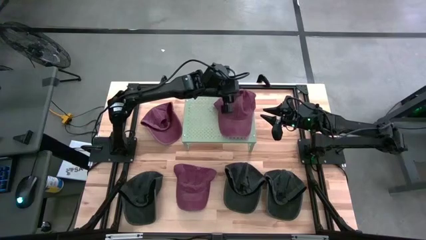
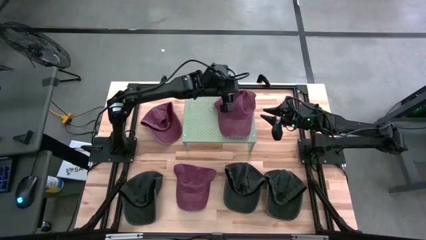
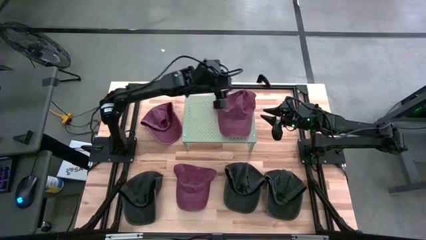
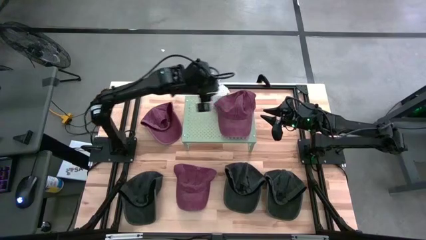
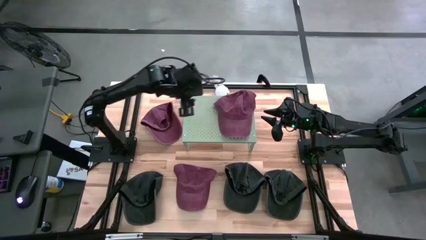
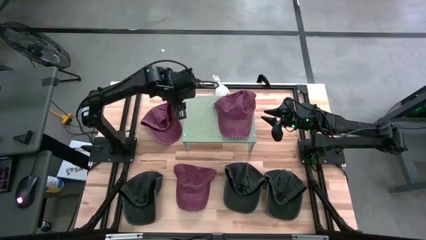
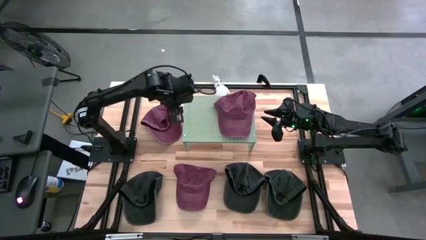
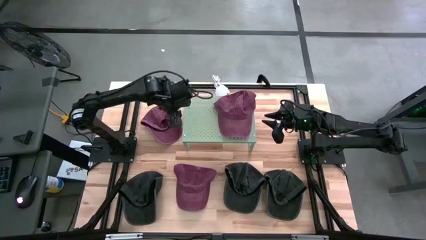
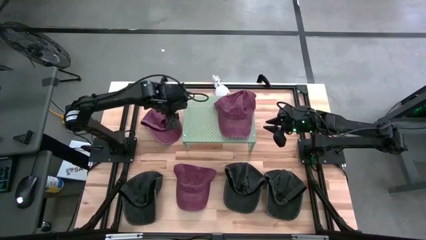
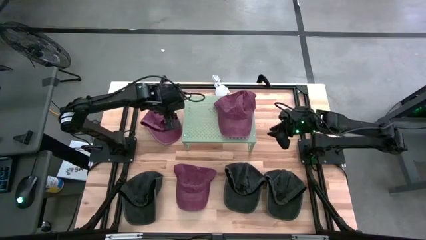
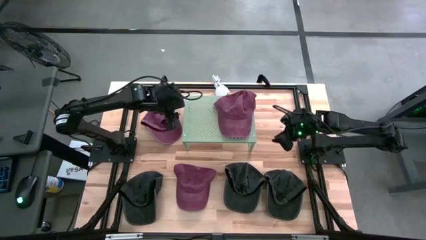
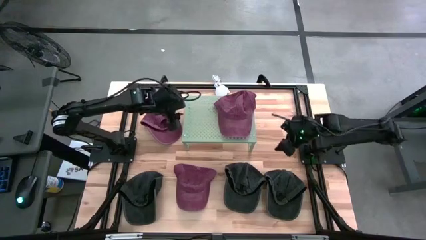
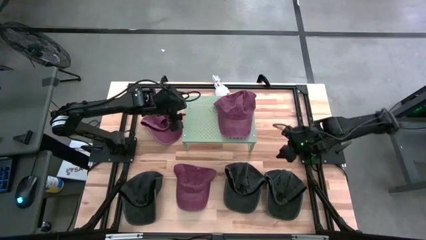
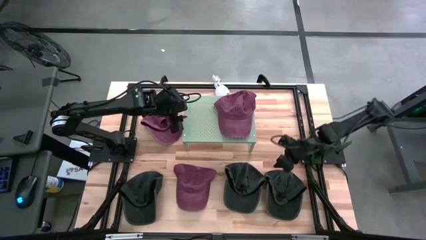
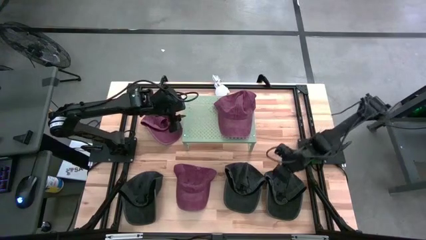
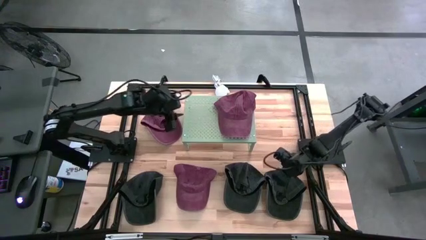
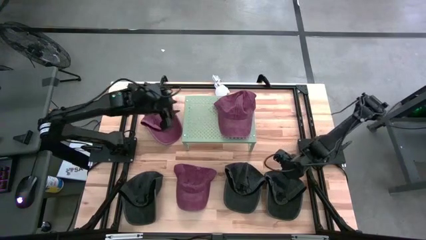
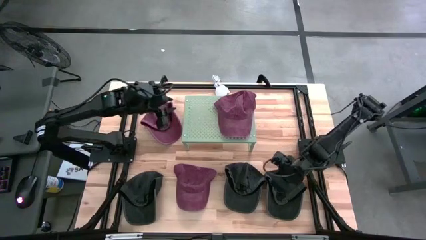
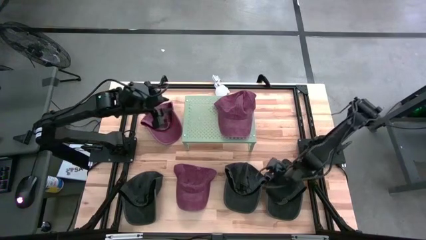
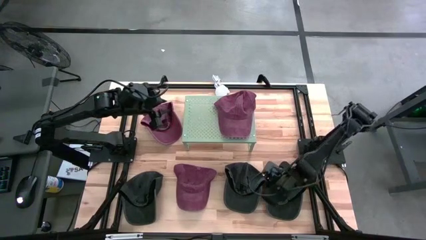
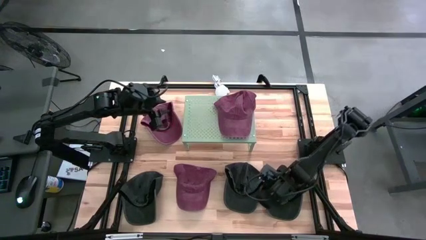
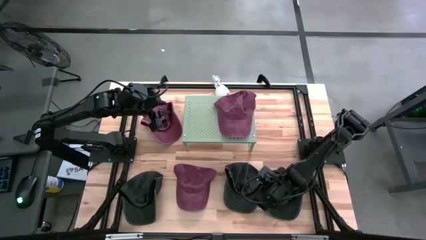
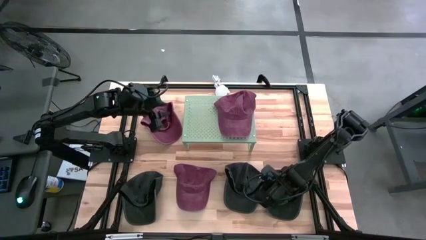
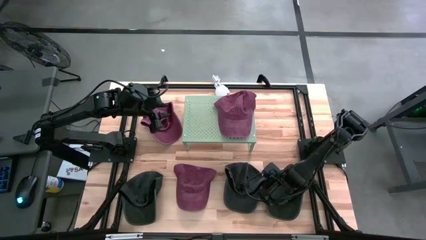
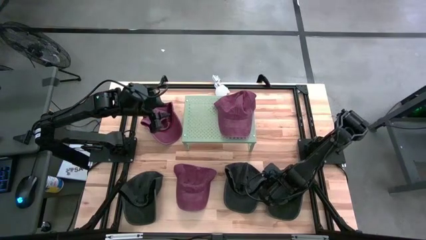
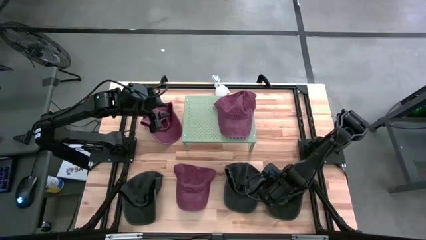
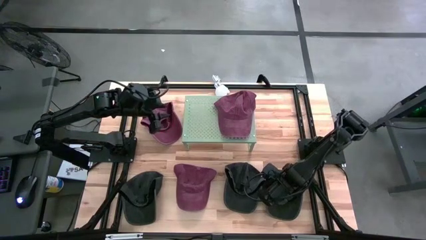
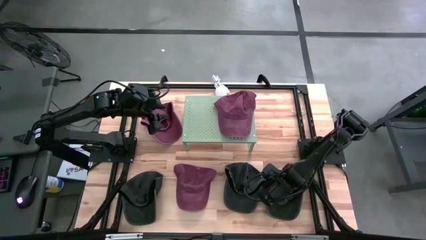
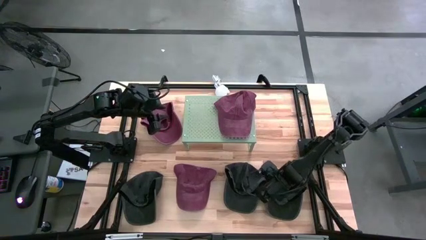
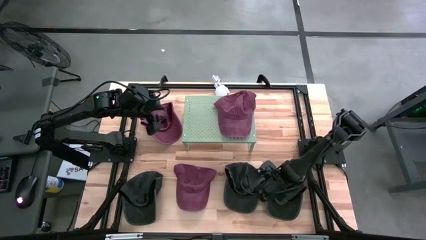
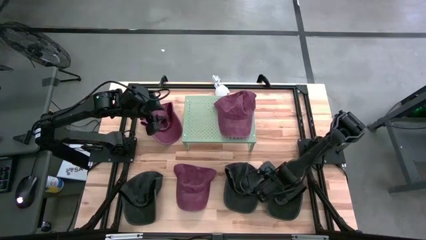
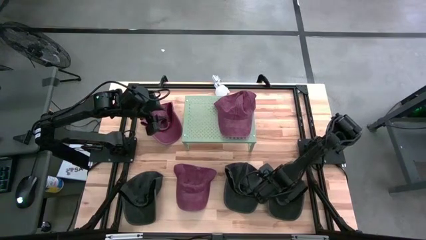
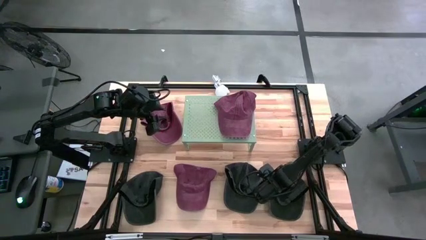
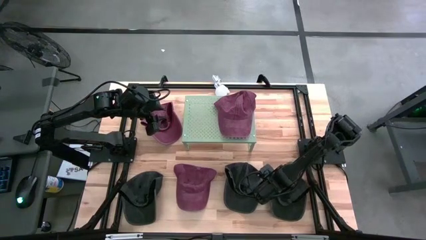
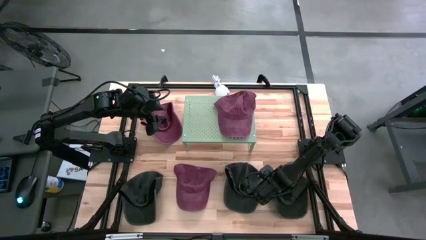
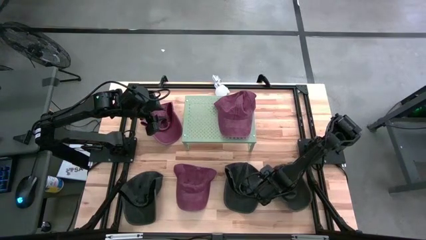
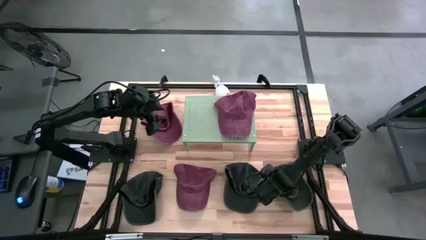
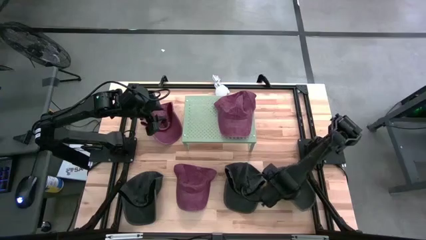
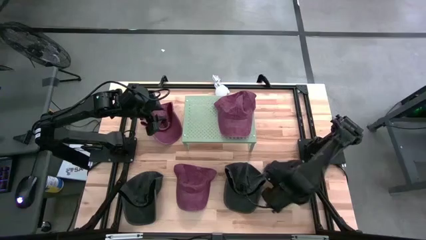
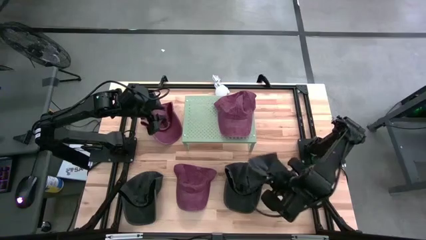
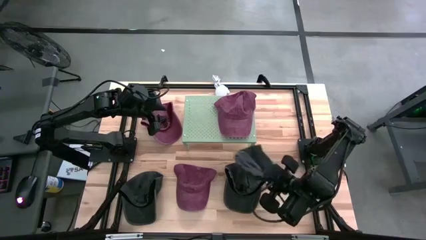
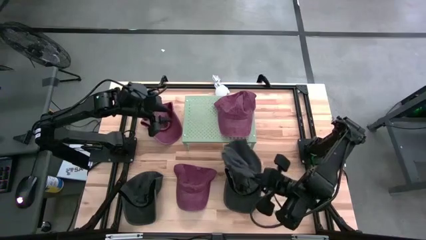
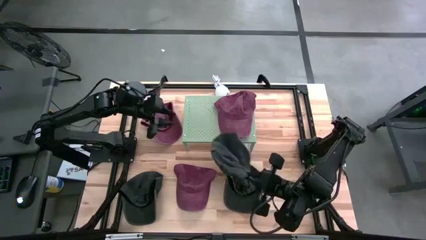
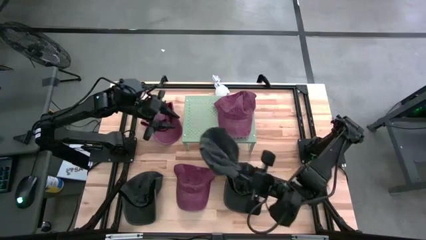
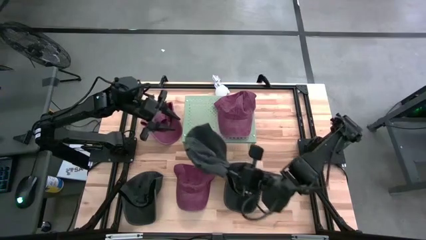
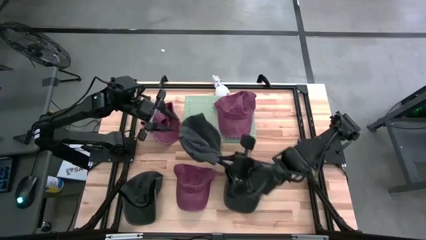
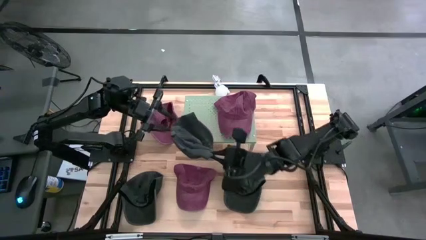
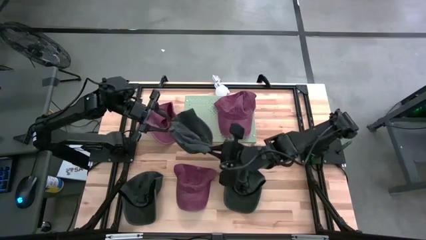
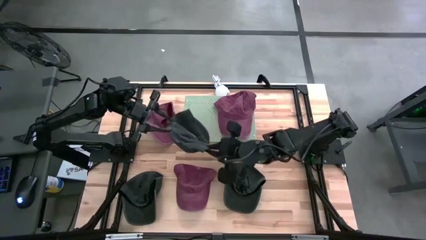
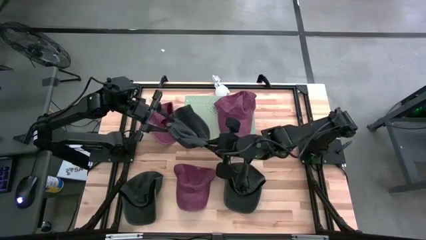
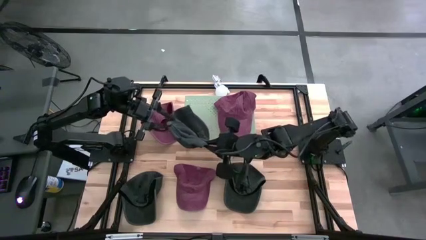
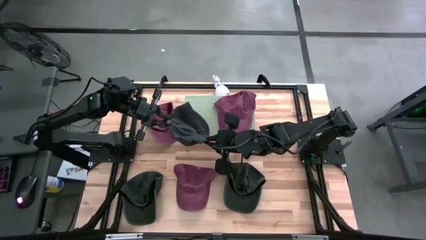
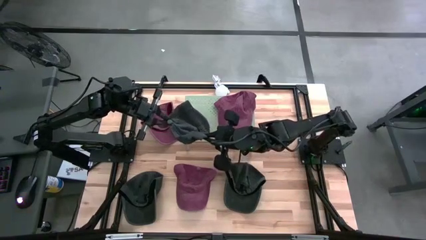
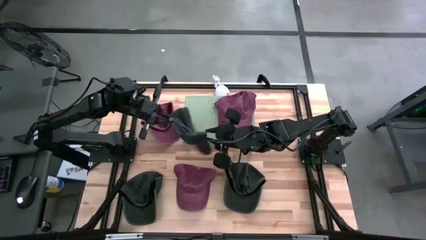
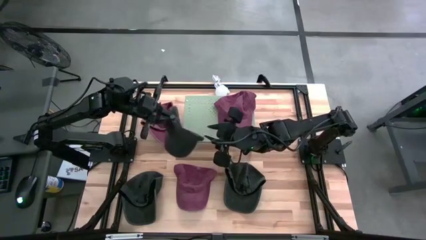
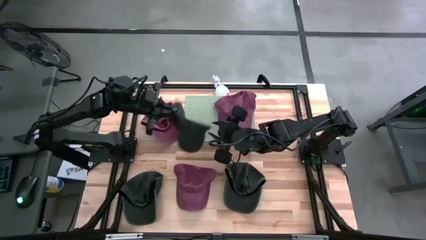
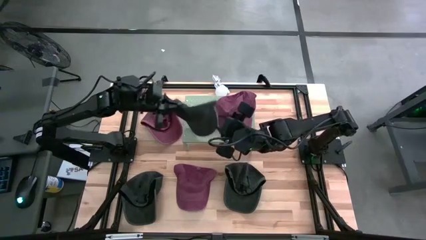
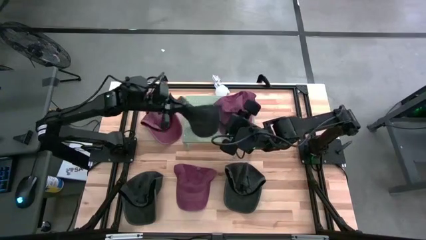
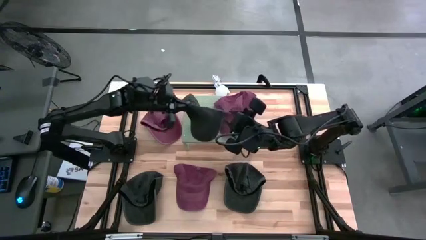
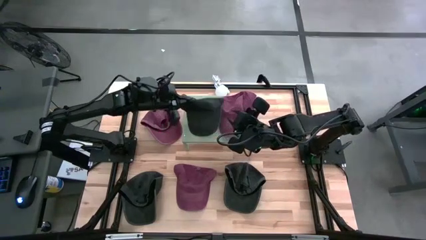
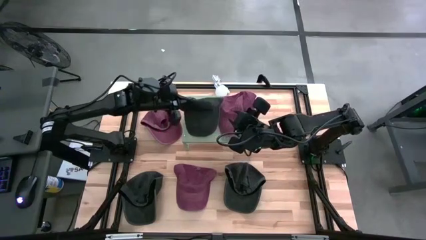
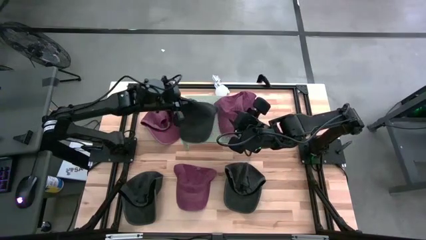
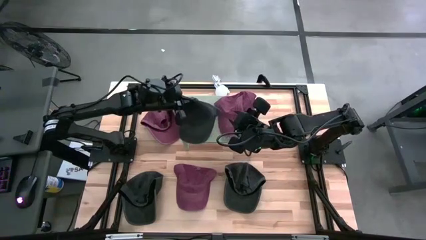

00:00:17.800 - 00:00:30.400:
Task: Pick & Place hat
Put the right black cap on the shelf

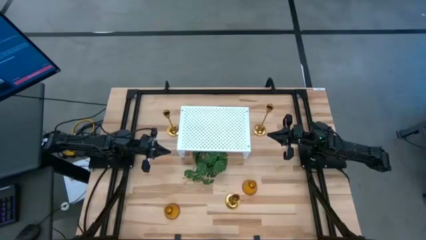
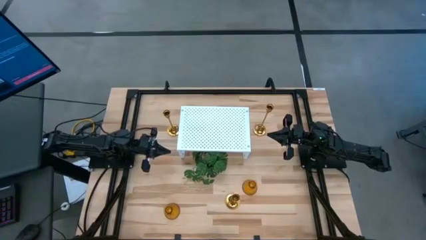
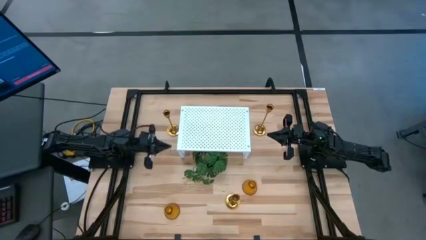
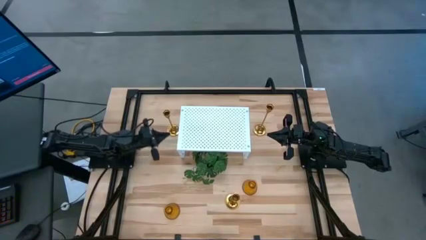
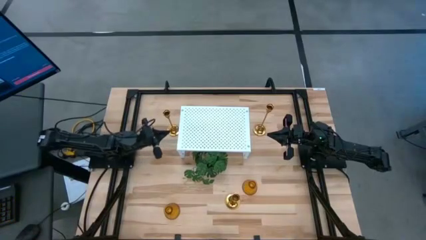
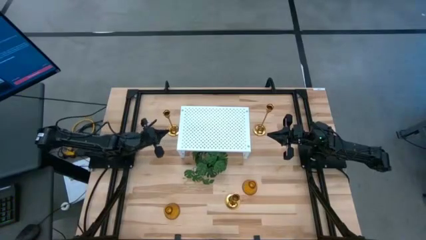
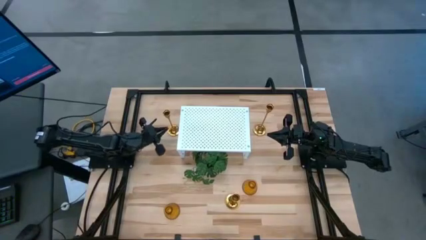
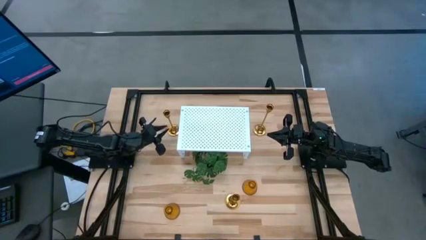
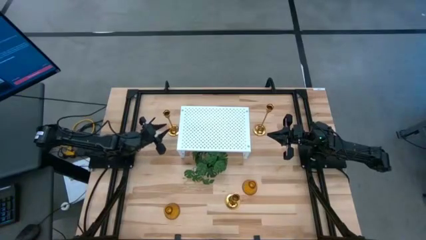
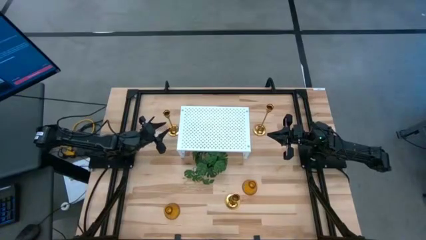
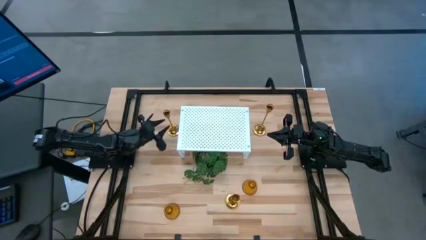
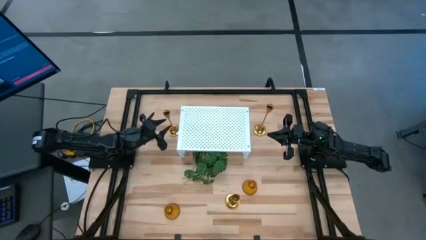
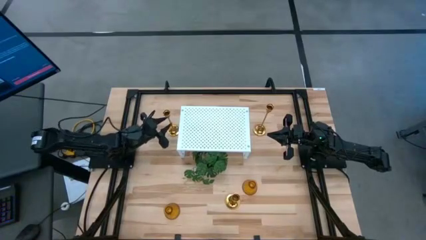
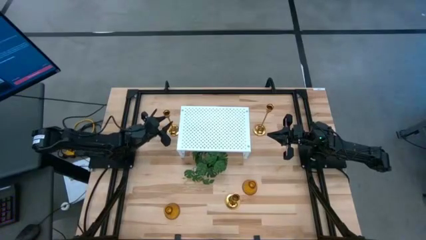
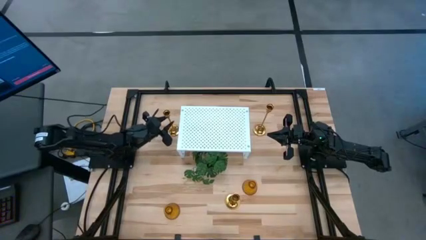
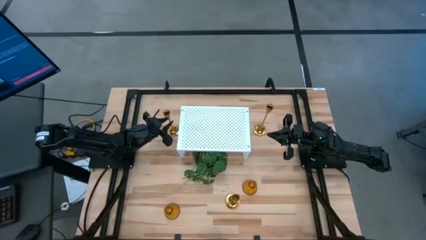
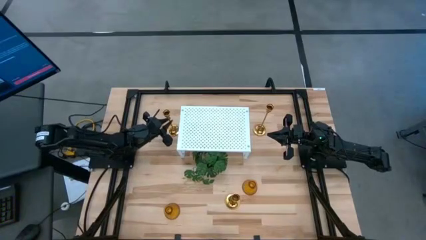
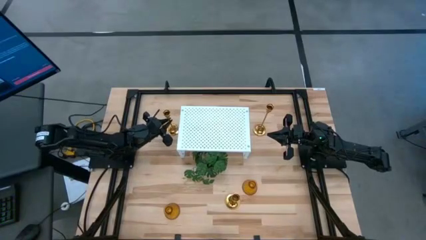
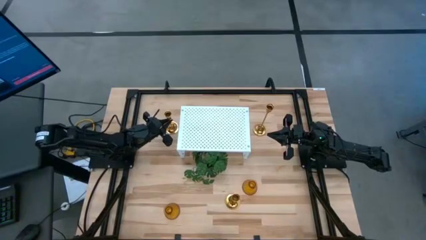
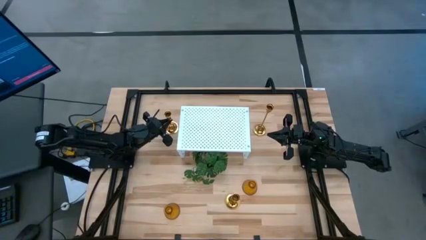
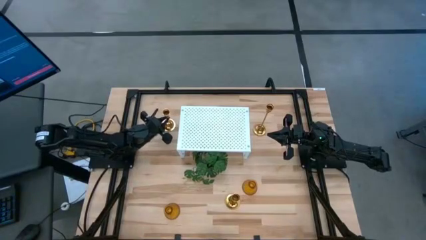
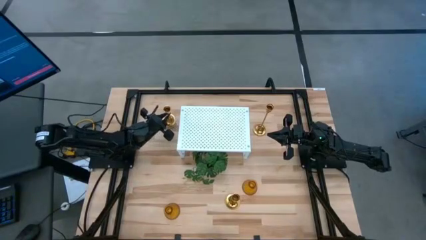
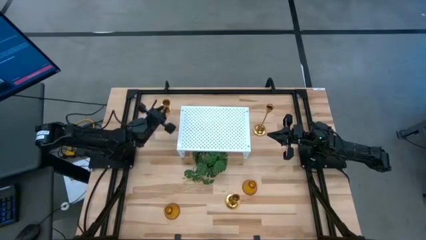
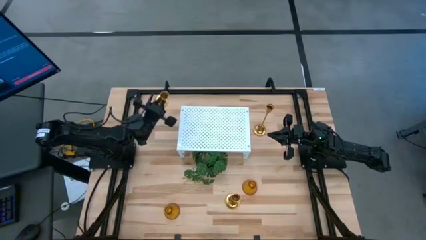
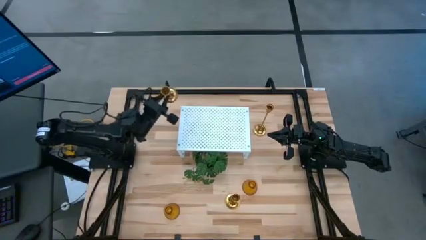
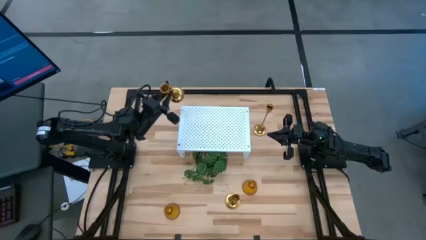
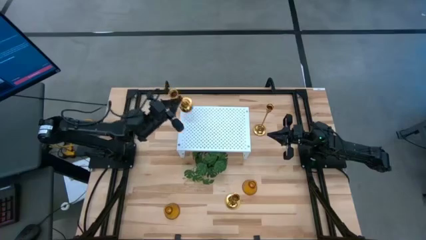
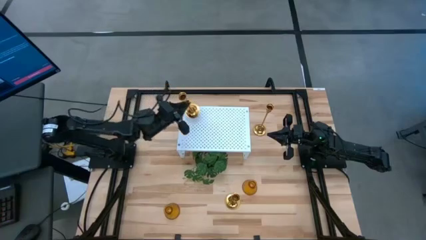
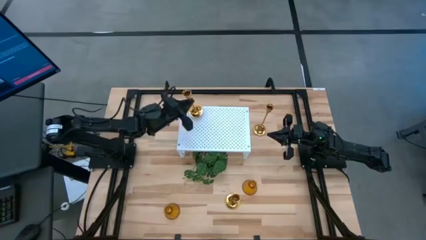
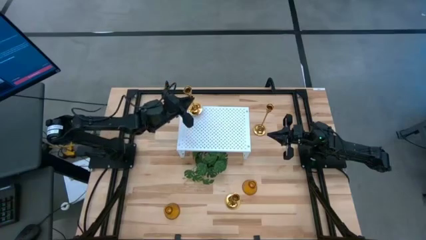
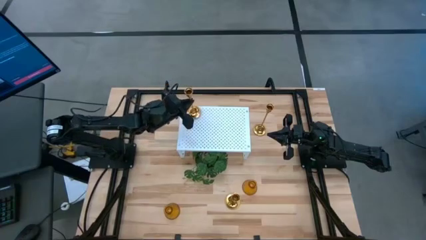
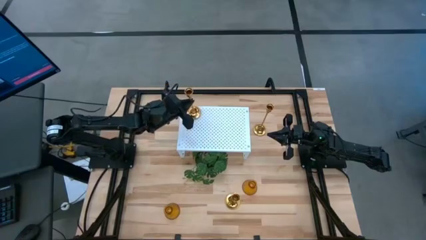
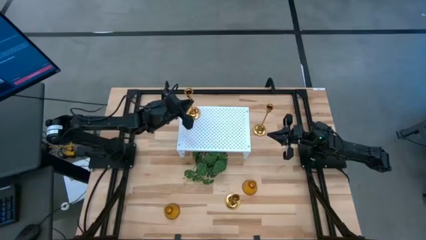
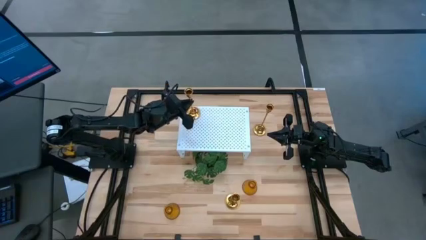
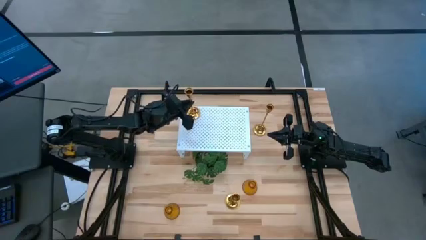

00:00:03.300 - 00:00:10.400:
Task: Pick & Place candle stick holders
Put the top left gold candle holder on the shelf
